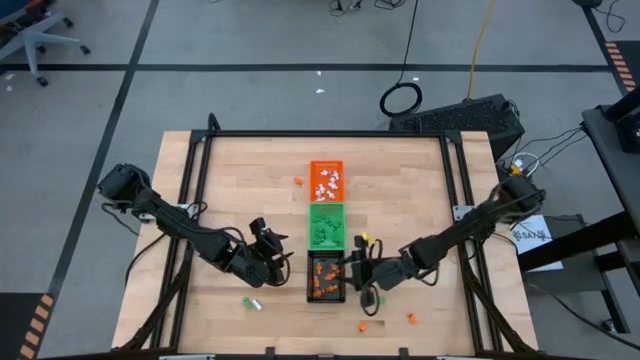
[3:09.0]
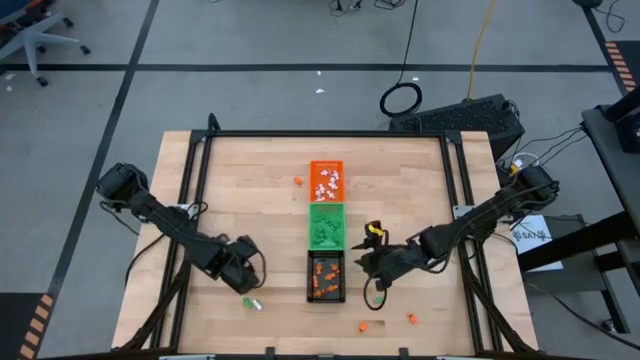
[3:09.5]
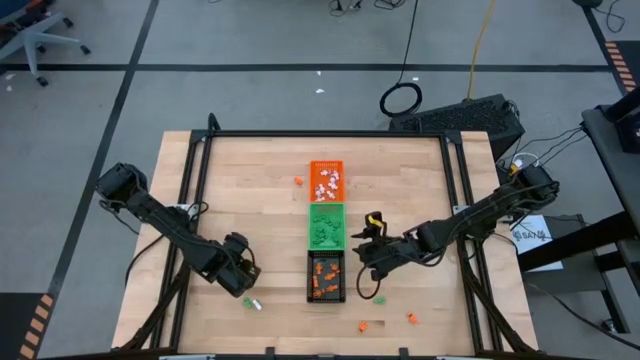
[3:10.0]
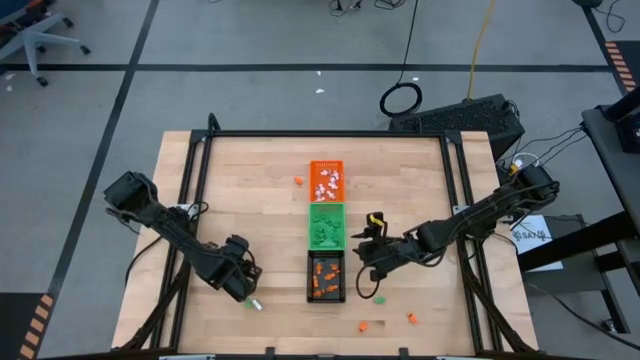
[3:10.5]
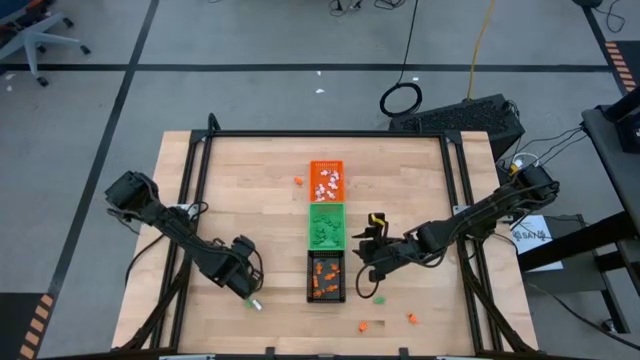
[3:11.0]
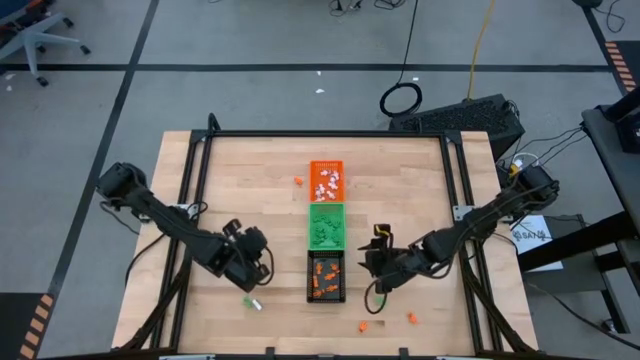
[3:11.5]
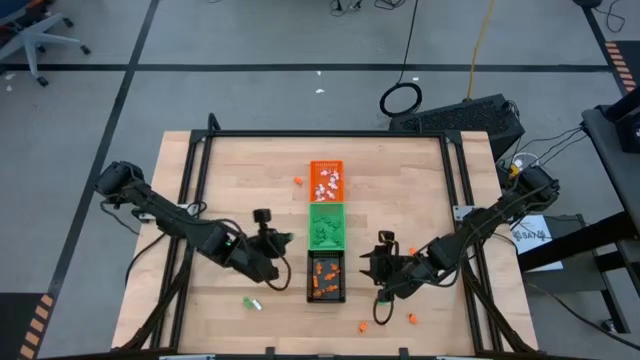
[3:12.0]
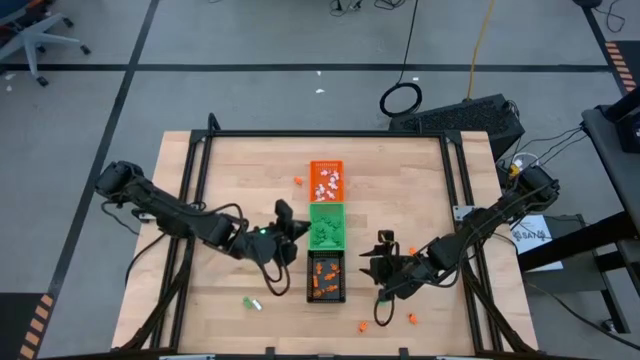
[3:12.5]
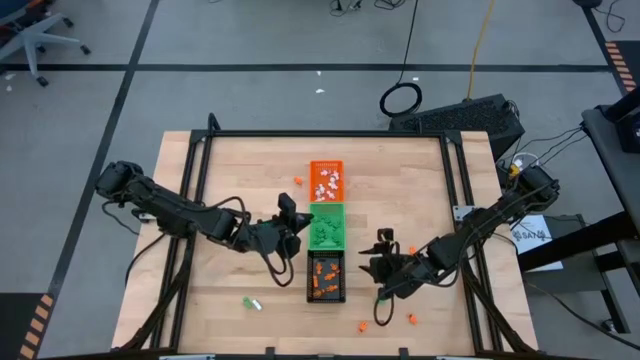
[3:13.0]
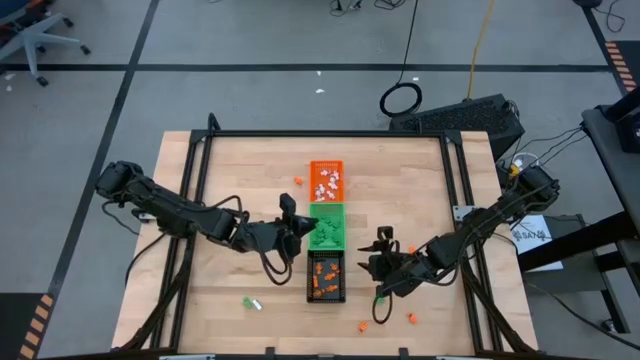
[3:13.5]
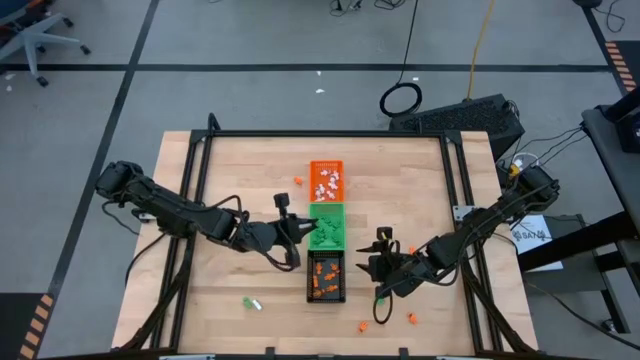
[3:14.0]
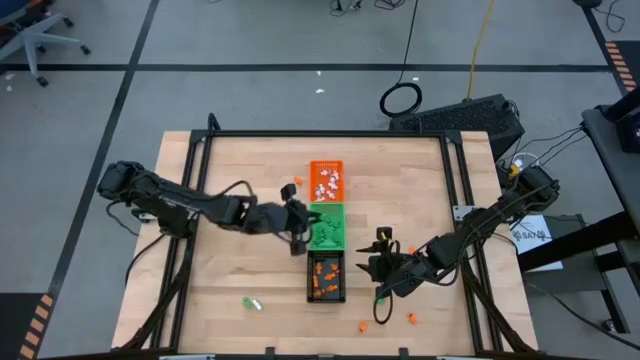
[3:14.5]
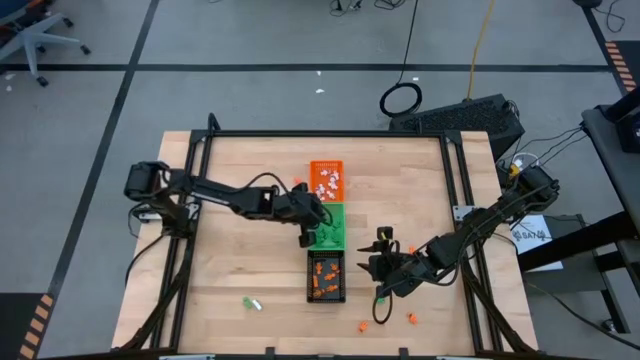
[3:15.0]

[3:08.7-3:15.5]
Task: Sort Halloween decoration
Put the green skeleton toy into the green bin

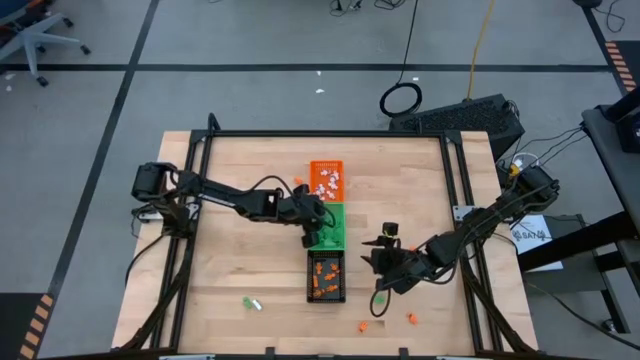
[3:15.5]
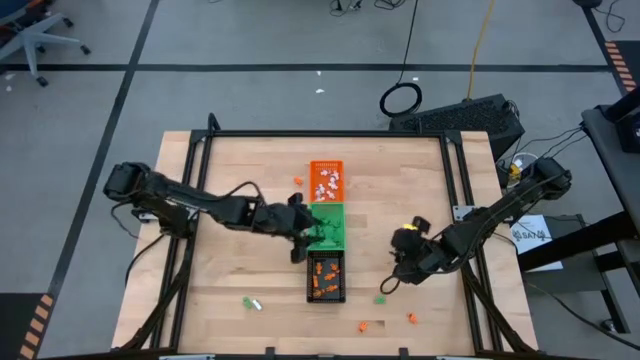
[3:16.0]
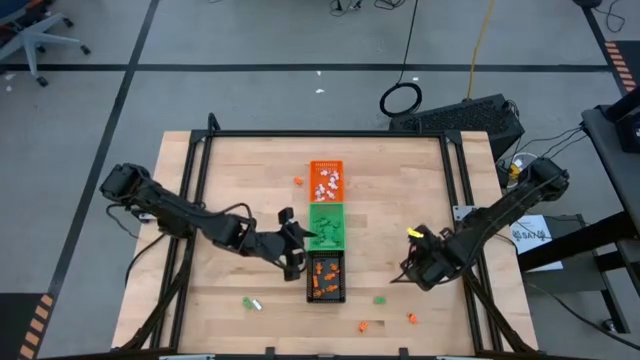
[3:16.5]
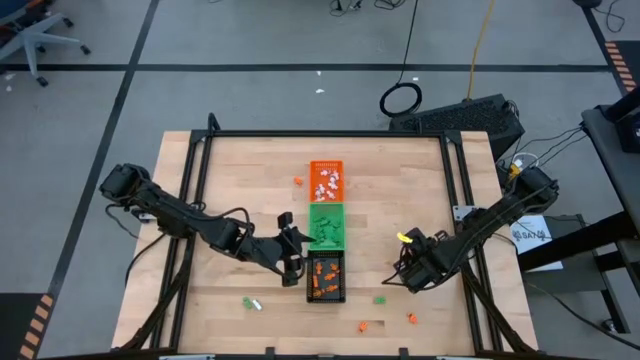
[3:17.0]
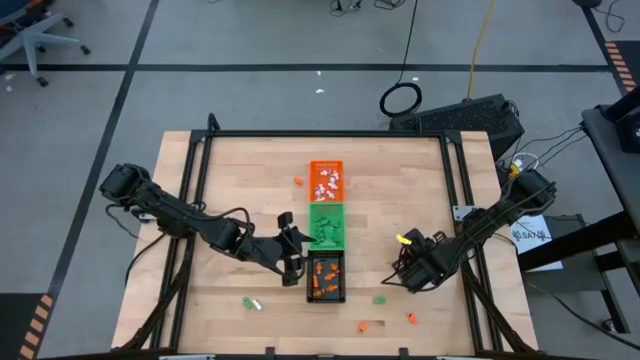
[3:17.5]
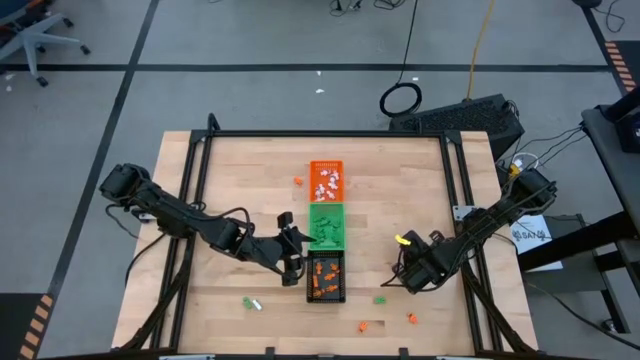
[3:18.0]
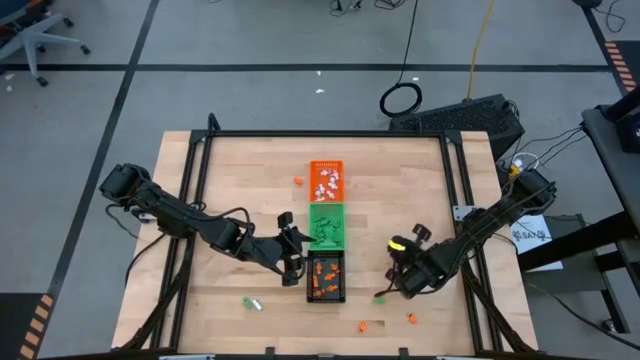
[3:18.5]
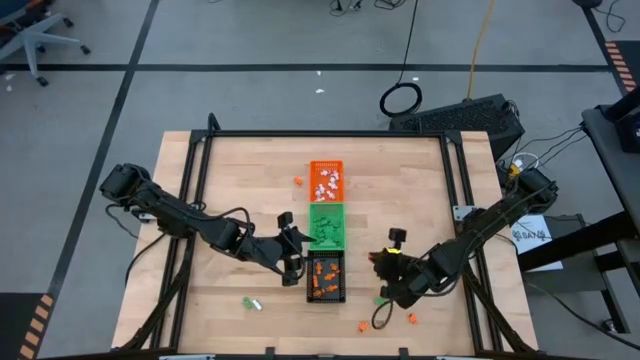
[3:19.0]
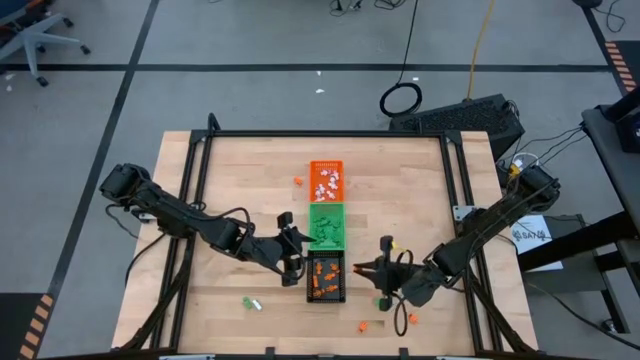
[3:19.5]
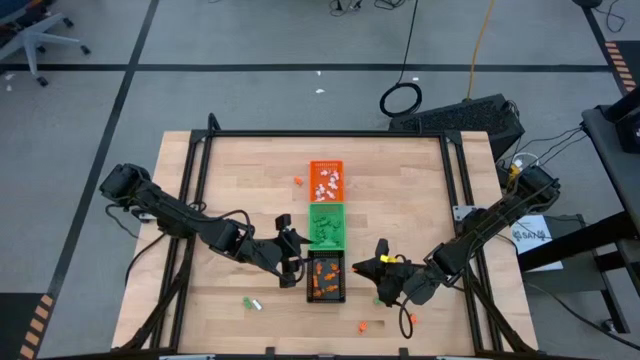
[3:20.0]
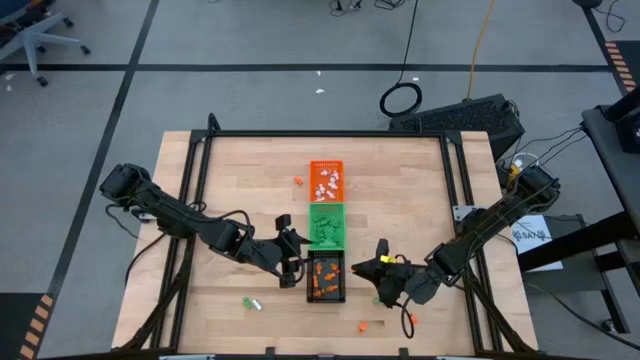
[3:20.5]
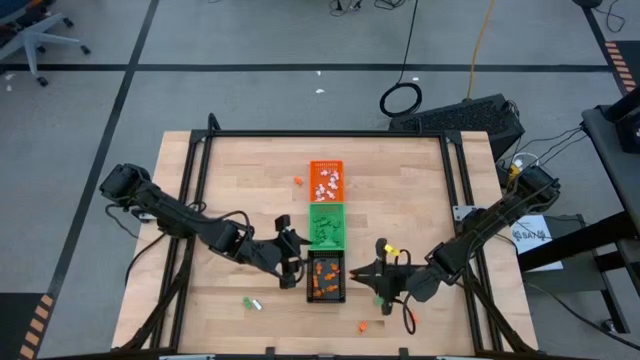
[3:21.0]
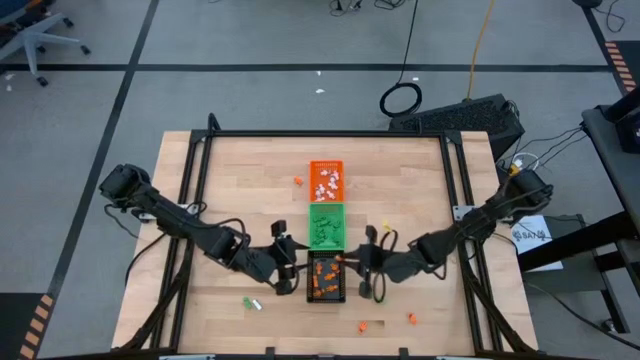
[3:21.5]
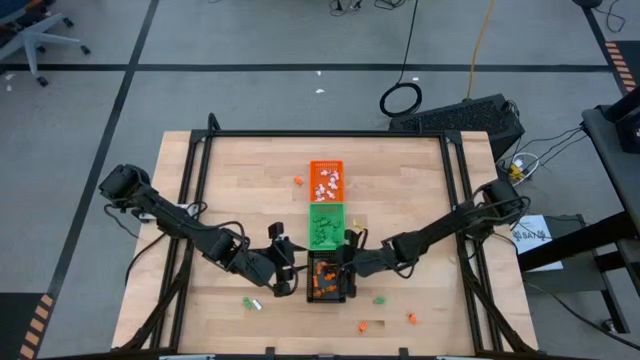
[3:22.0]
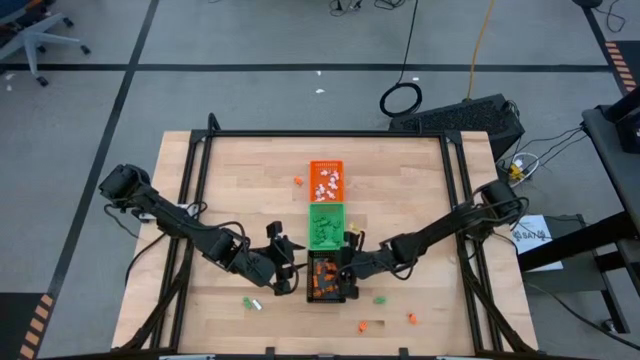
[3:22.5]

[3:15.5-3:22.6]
Put the orange skeleton toy into the black bin

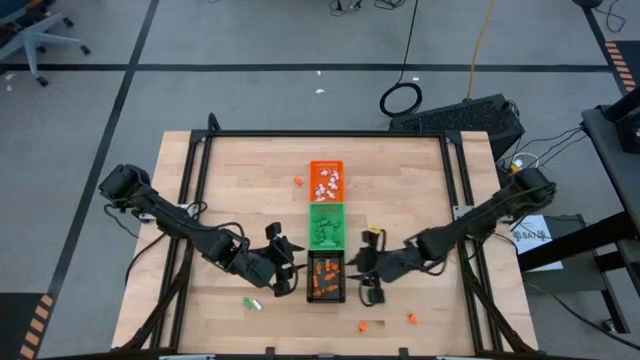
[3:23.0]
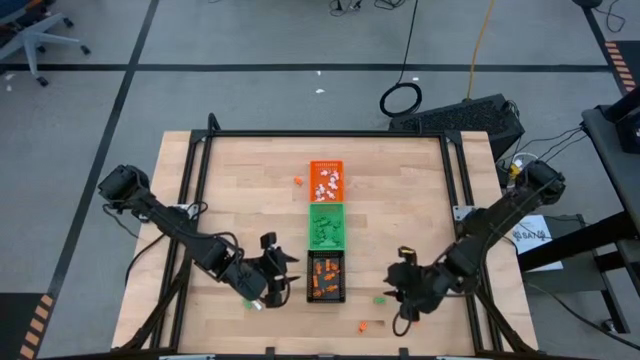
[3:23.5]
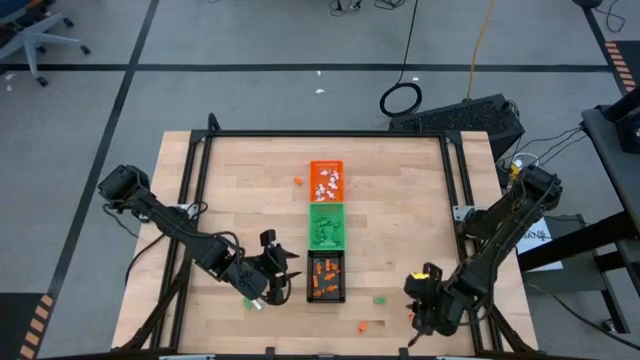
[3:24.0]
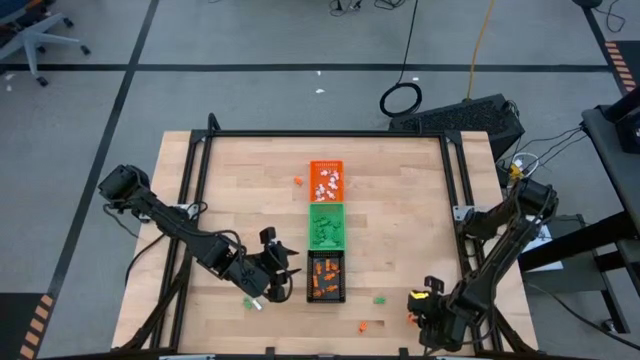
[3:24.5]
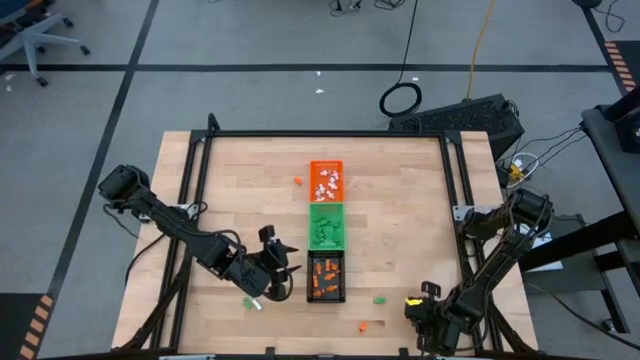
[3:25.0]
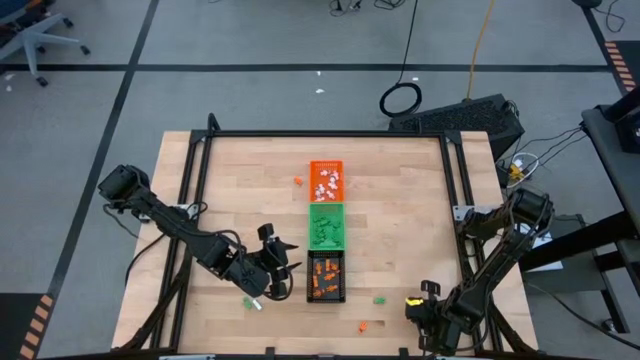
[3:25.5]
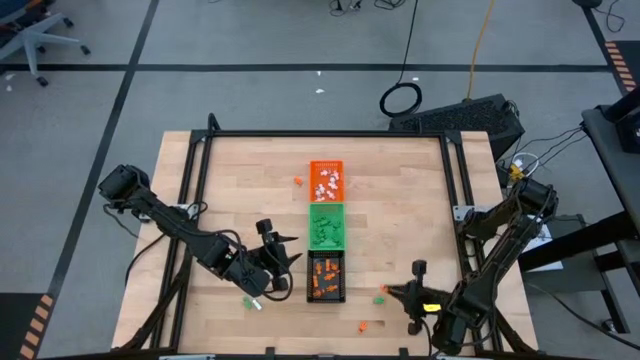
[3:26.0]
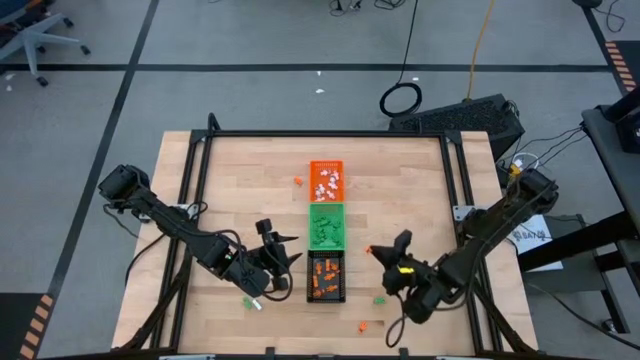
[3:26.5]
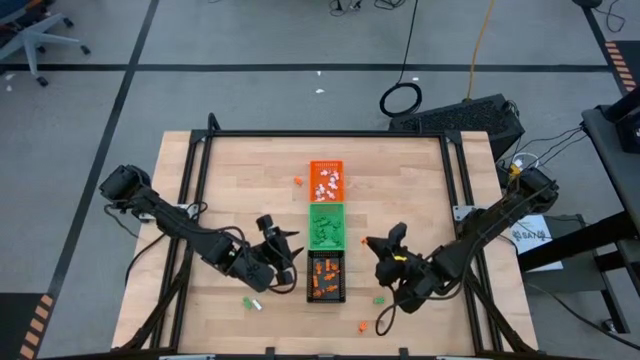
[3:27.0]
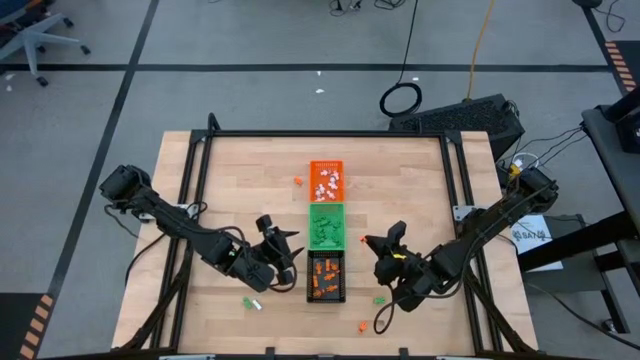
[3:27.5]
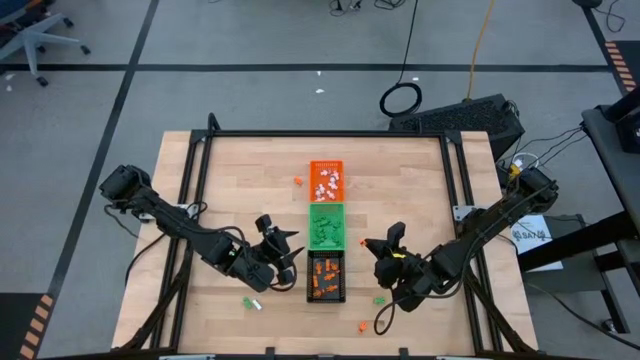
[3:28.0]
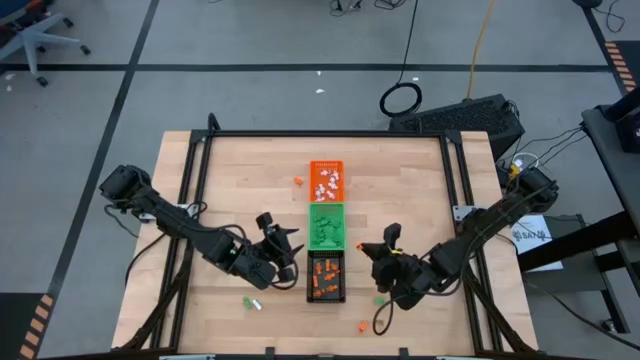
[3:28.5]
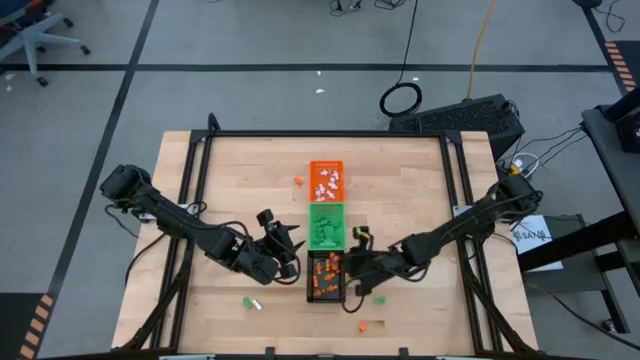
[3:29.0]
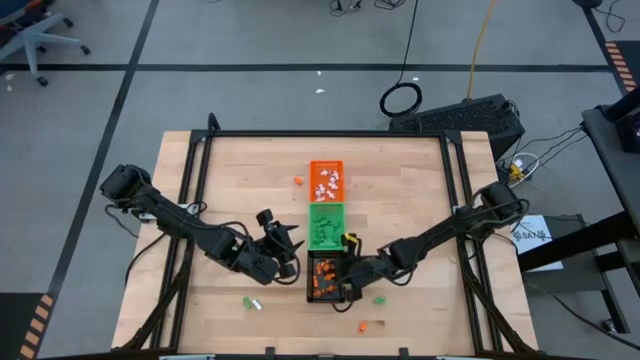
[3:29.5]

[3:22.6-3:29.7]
Put the orange skeleton toy into the black bin
